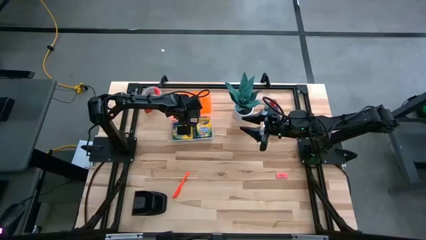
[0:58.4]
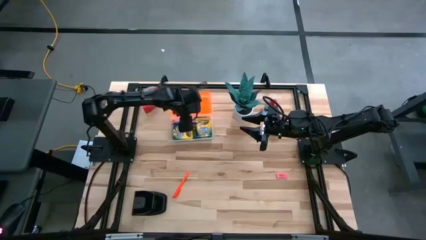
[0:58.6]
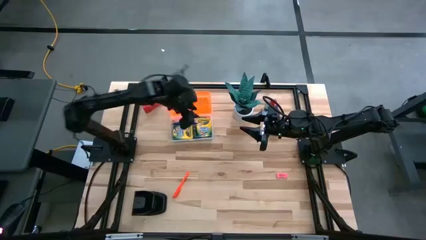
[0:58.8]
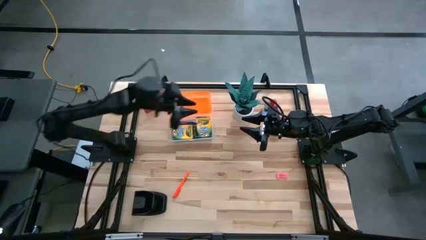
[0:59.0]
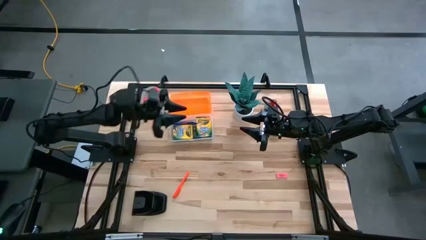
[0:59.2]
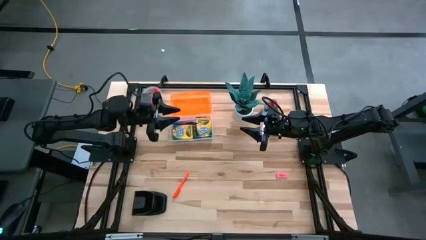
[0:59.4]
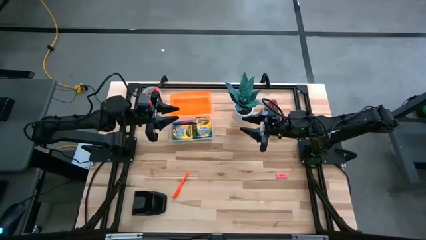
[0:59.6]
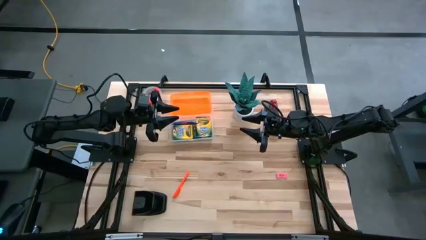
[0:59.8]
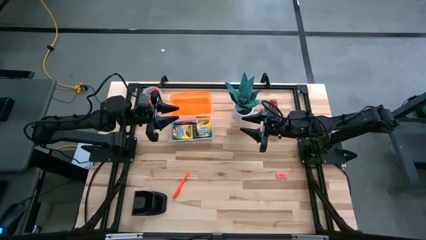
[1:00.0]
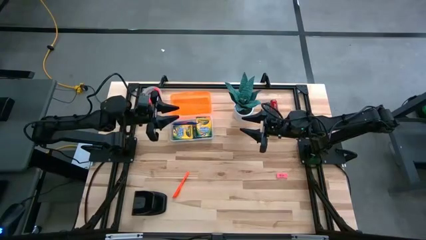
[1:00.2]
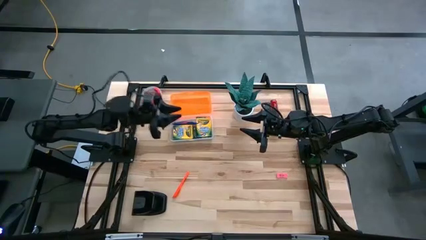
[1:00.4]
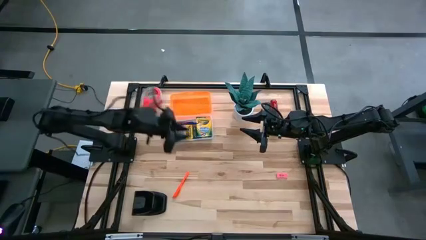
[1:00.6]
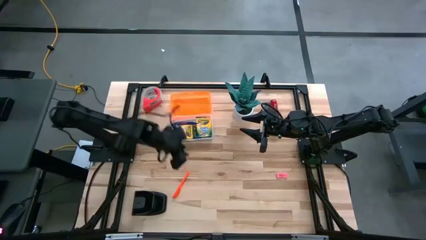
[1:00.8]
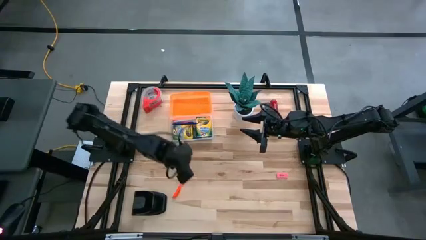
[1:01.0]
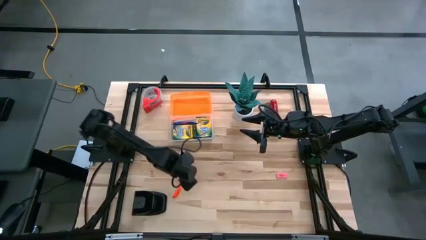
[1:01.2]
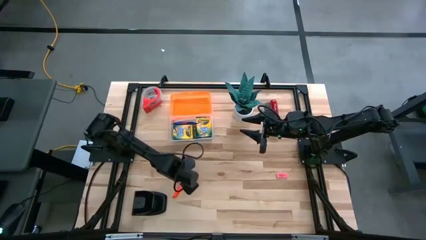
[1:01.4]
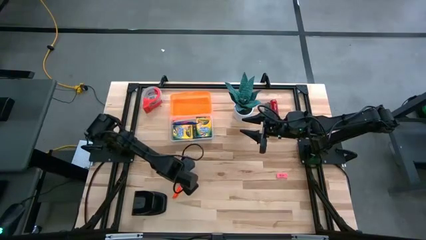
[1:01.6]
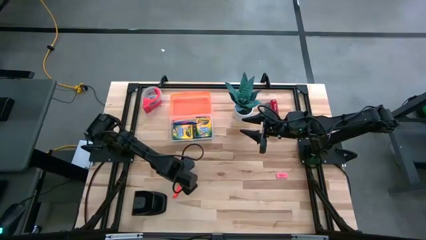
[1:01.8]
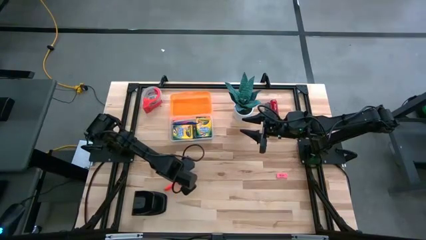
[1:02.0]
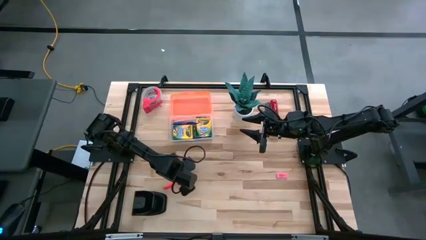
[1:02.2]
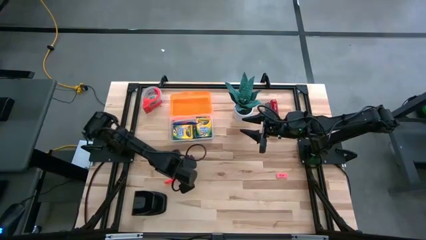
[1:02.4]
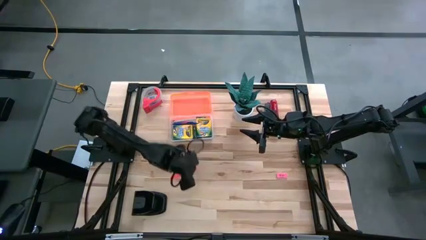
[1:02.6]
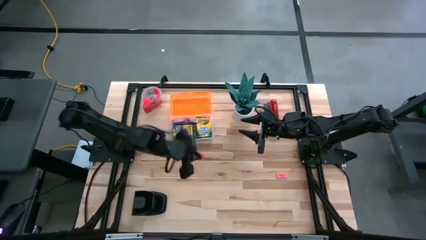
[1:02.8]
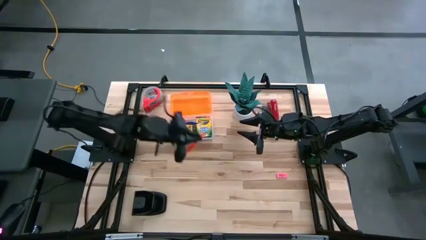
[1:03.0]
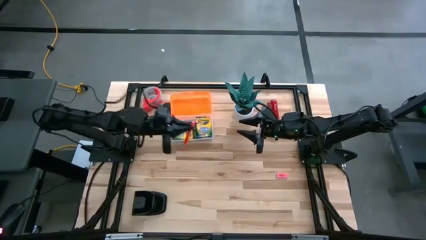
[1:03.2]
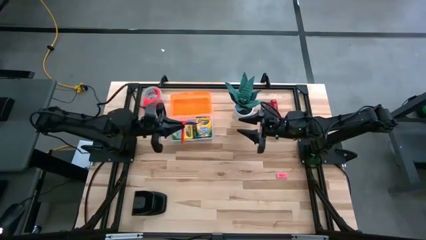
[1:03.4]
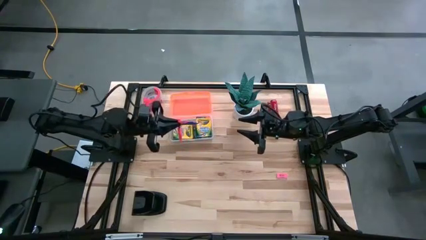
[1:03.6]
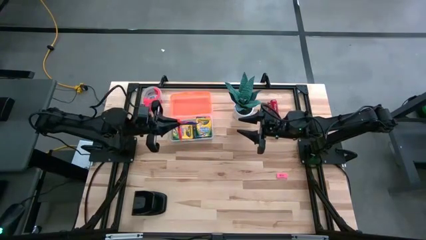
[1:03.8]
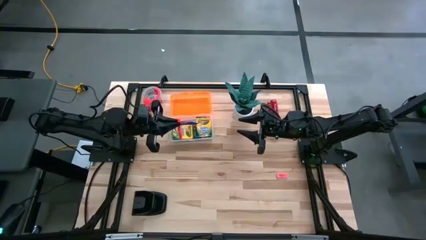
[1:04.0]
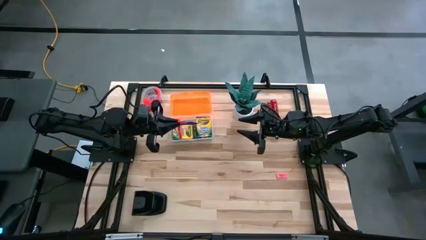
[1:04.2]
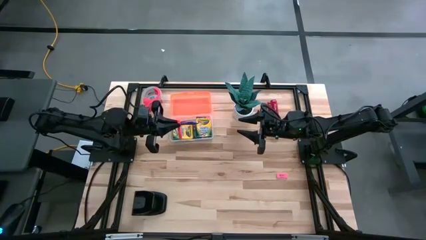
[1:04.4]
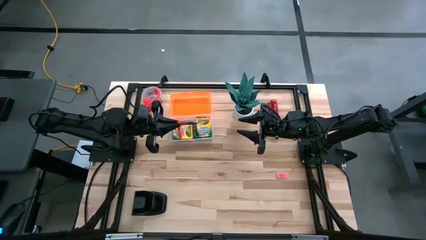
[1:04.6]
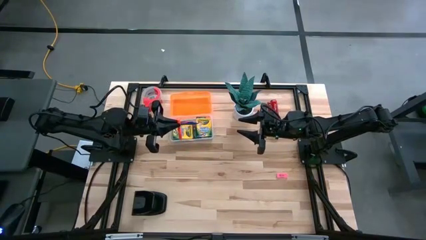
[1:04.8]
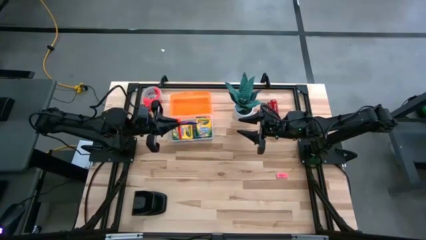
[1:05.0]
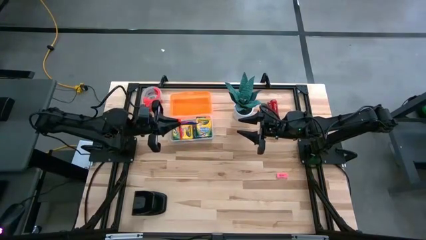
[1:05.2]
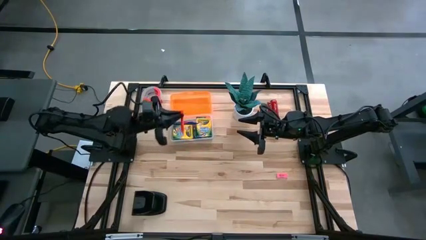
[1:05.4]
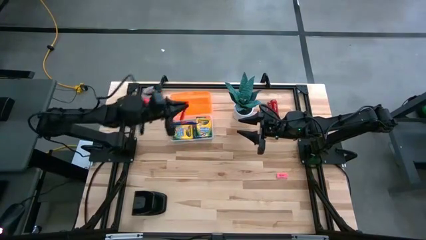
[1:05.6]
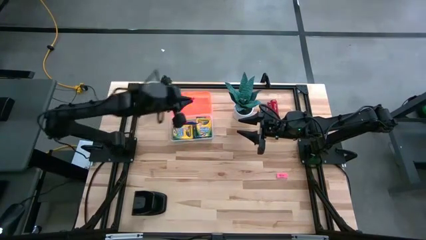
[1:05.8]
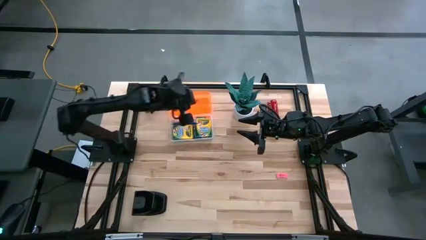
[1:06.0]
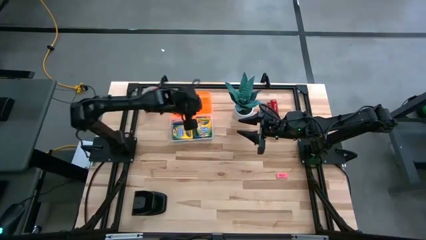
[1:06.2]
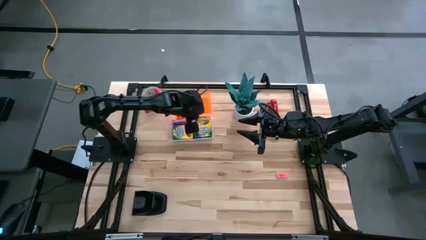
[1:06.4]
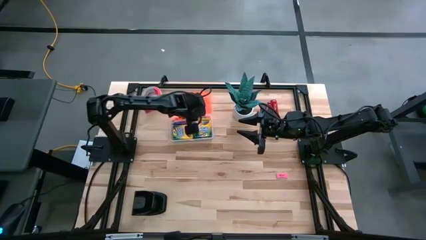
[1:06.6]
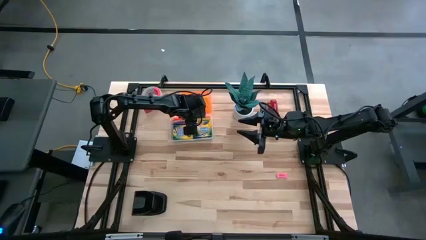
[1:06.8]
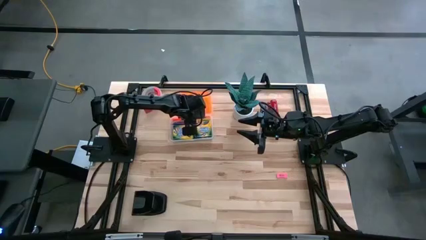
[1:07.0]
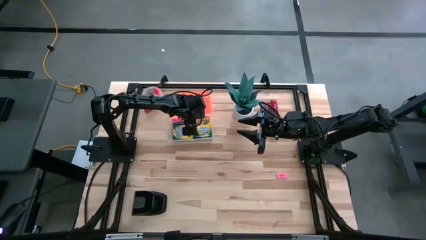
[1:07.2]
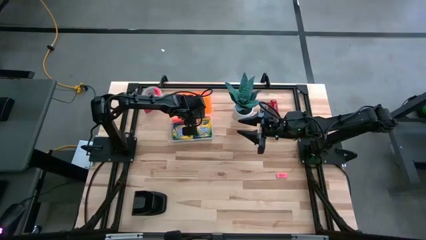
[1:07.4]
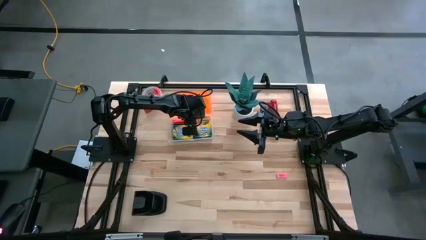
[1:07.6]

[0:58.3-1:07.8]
Task: Pack school essentials
Put the orange pen into the orange supply box

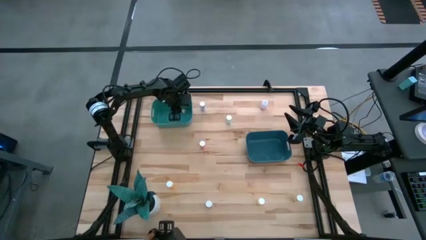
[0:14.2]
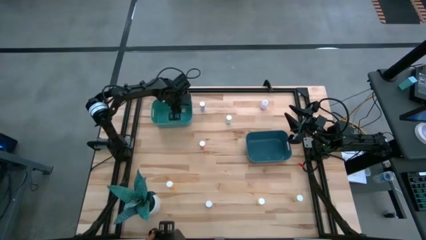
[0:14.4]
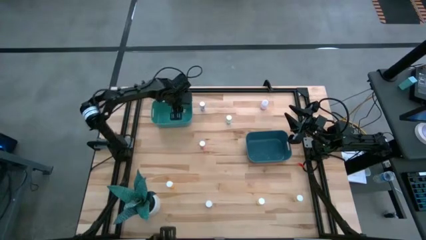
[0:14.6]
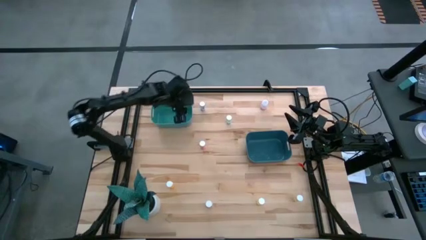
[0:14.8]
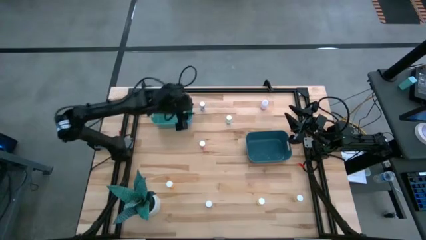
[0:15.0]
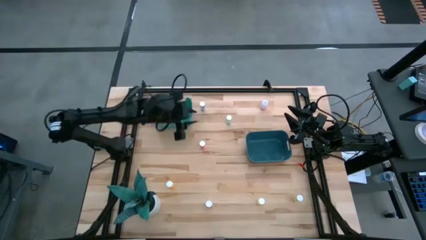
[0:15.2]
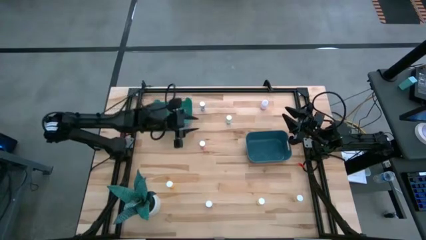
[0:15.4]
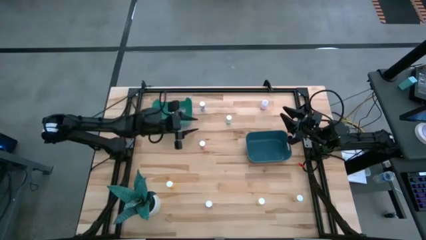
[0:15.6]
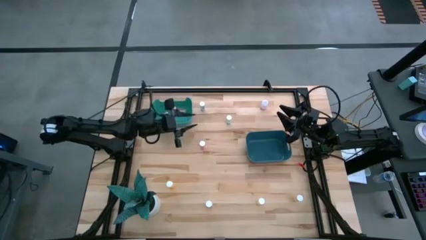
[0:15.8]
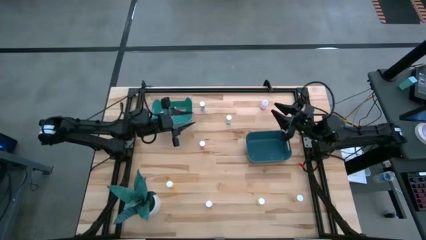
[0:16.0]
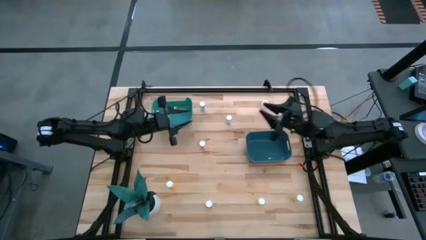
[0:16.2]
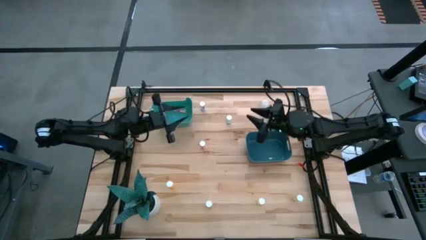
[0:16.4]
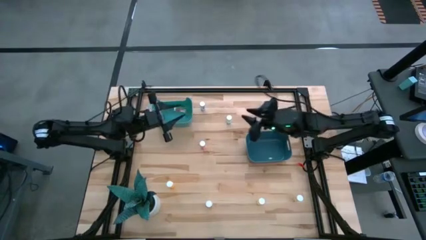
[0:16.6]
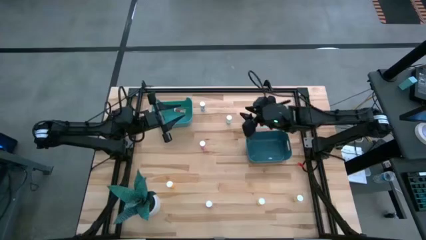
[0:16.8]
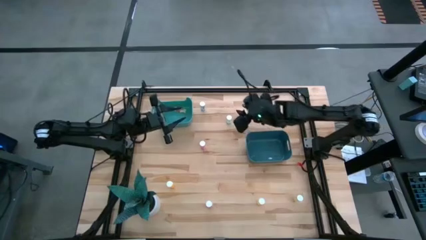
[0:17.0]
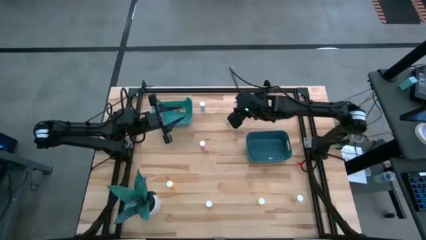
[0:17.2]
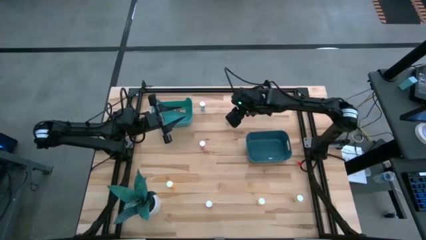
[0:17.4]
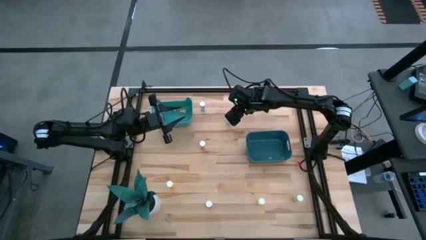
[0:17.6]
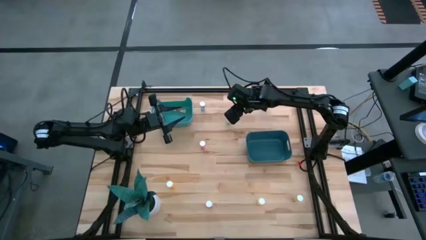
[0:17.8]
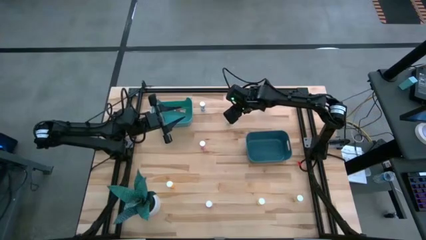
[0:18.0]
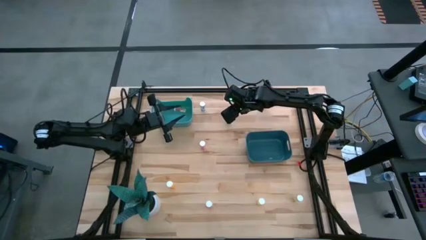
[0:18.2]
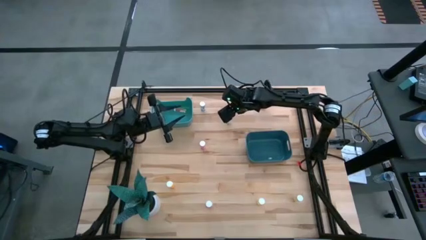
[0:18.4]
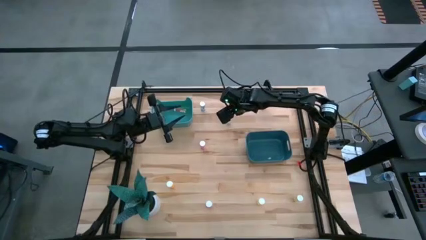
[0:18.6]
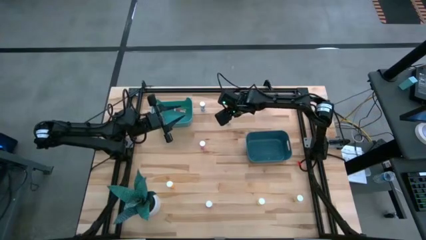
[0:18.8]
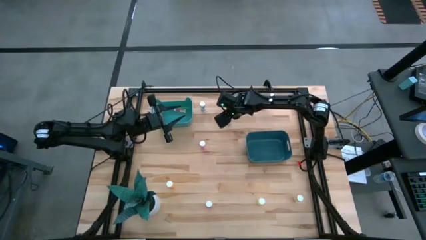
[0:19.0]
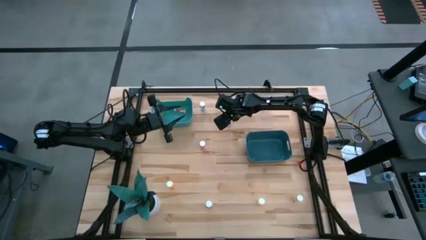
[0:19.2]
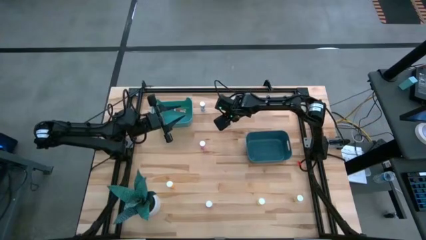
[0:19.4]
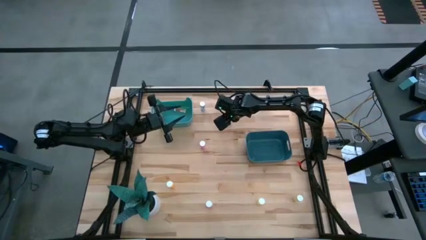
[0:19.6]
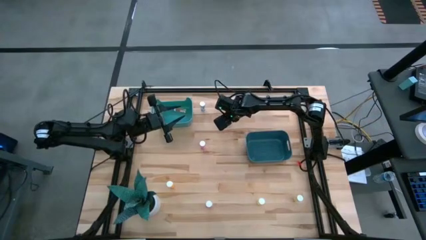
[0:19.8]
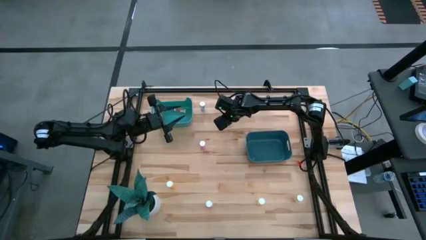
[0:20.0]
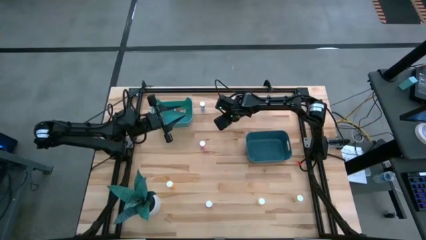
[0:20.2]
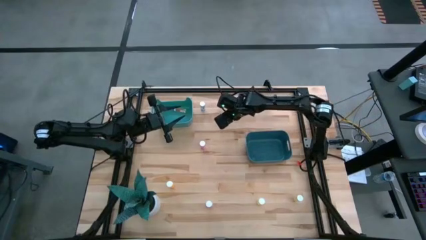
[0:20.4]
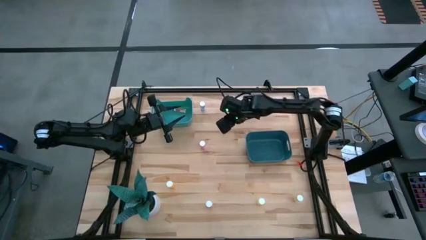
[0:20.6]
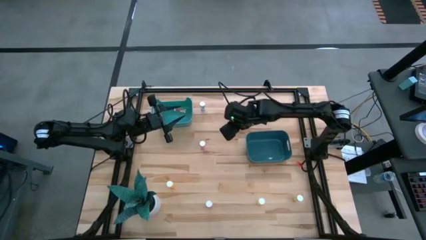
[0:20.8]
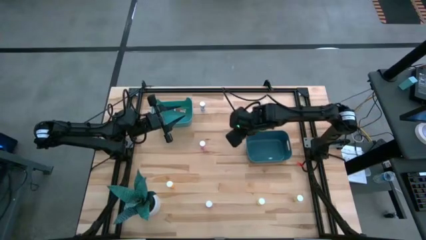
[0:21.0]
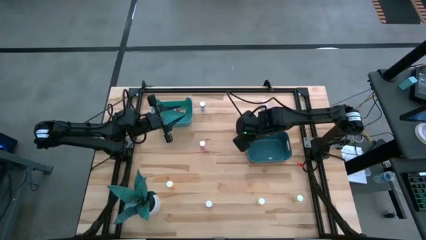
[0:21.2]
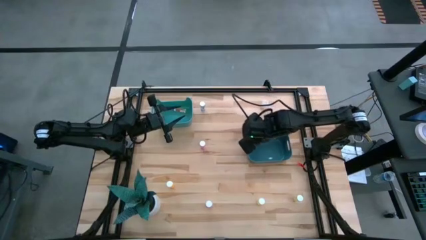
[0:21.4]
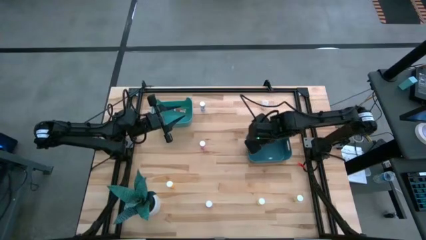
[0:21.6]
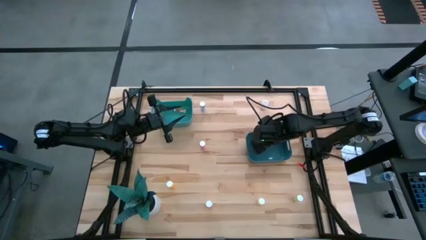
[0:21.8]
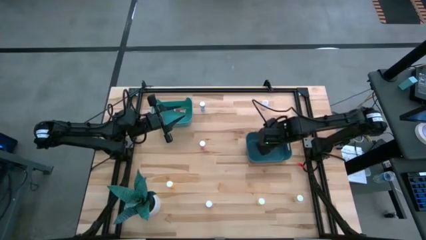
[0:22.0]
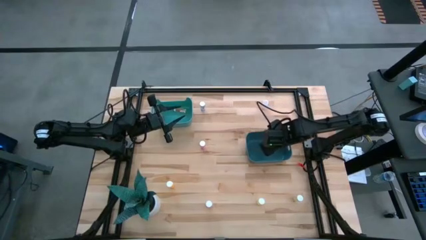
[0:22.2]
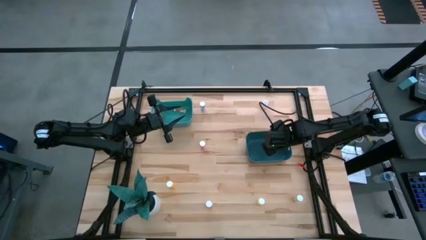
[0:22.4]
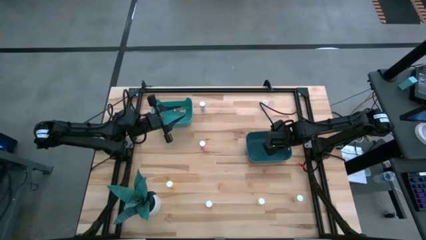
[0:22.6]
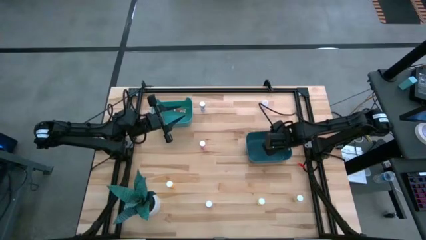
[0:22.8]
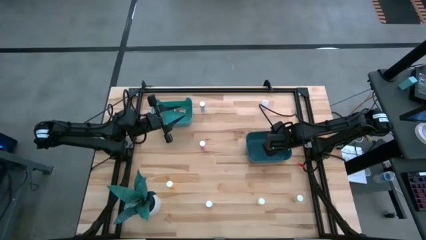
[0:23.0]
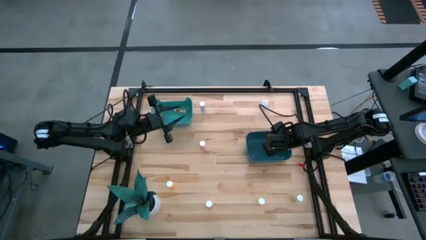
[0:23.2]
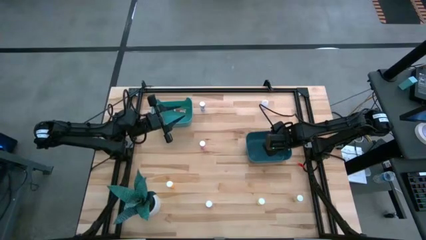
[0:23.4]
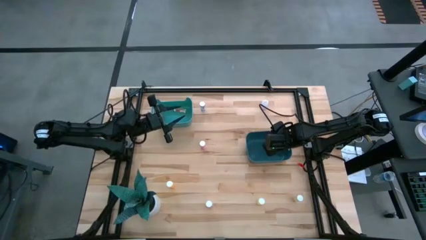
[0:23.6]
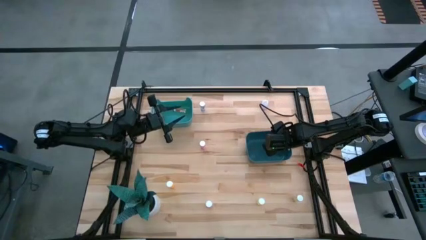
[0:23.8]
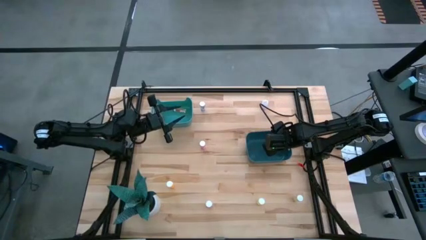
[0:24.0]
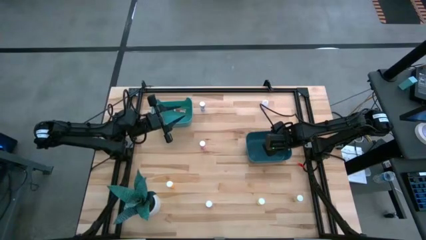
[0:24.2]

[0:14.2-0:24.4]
Task: Pick and place medicine bottles into bin by pill shape (circle, oval)
Put the blue tablet bottle into the blue bin
